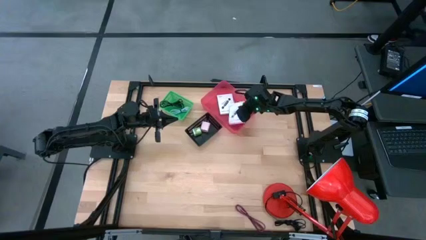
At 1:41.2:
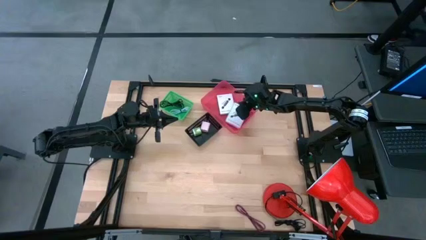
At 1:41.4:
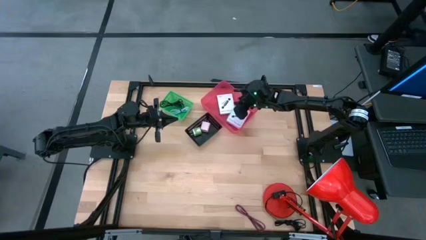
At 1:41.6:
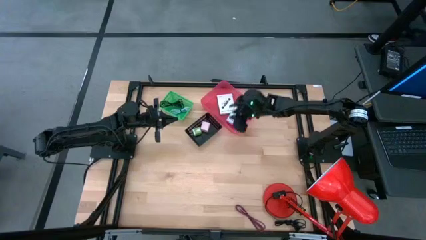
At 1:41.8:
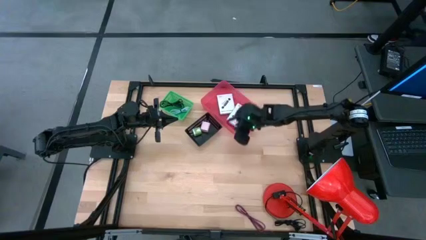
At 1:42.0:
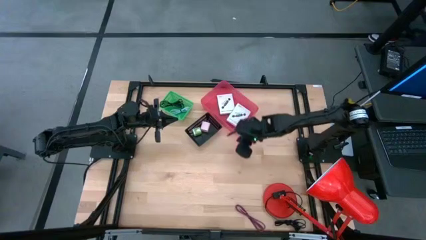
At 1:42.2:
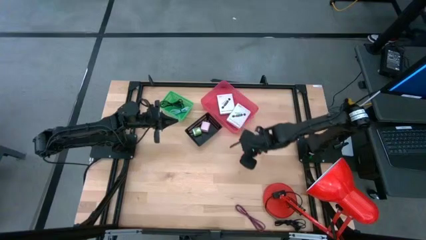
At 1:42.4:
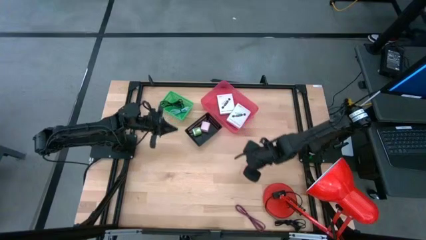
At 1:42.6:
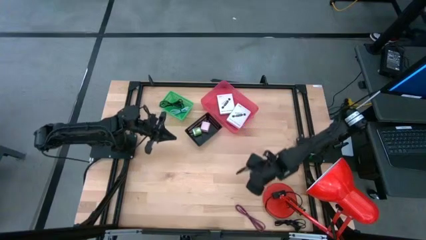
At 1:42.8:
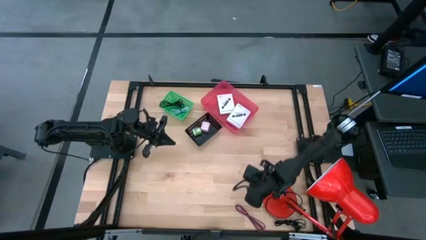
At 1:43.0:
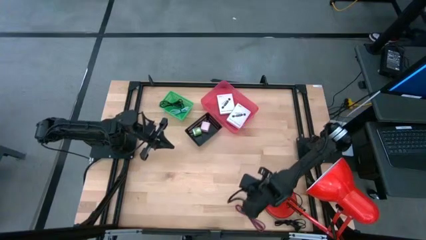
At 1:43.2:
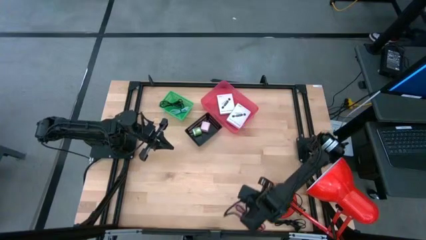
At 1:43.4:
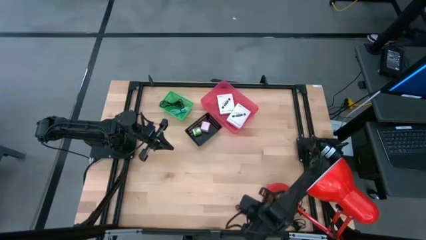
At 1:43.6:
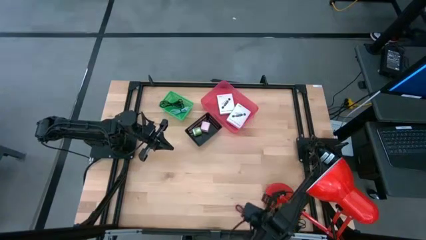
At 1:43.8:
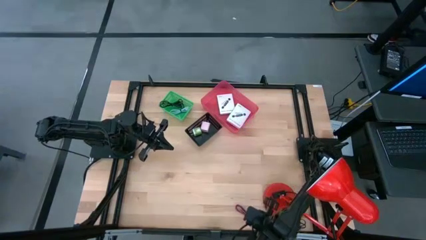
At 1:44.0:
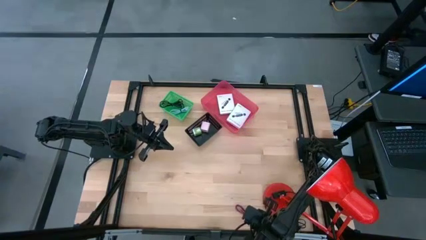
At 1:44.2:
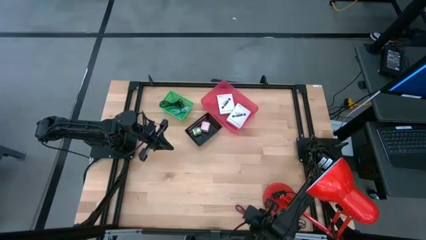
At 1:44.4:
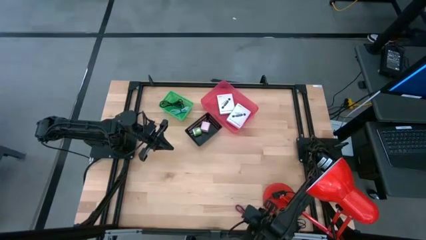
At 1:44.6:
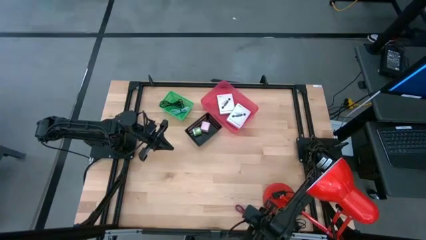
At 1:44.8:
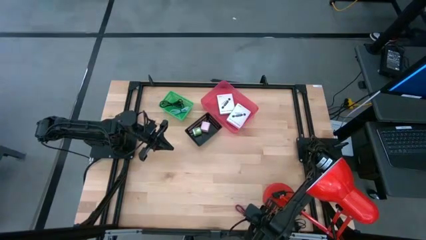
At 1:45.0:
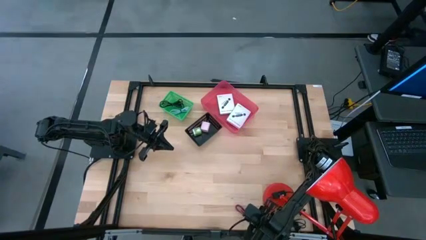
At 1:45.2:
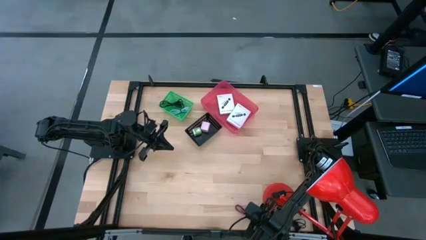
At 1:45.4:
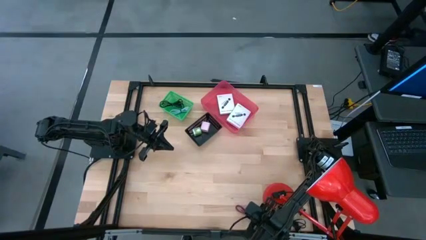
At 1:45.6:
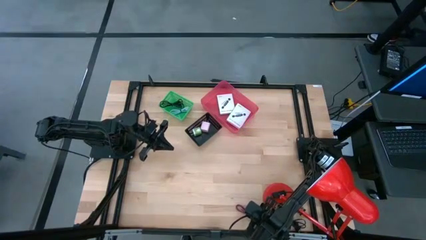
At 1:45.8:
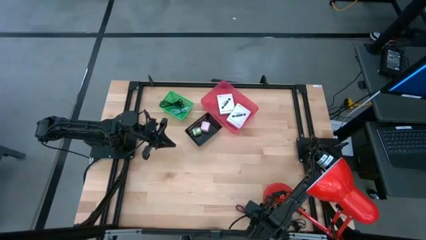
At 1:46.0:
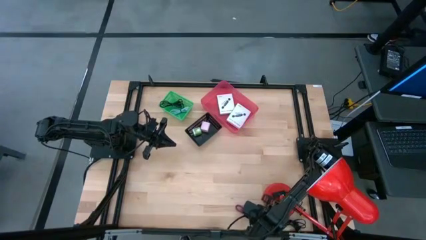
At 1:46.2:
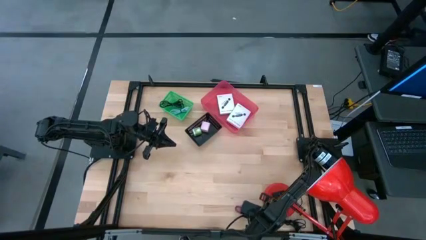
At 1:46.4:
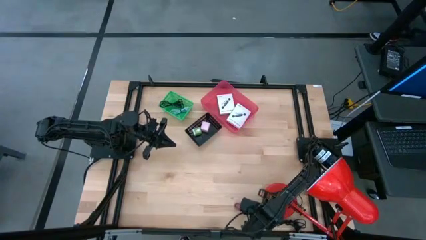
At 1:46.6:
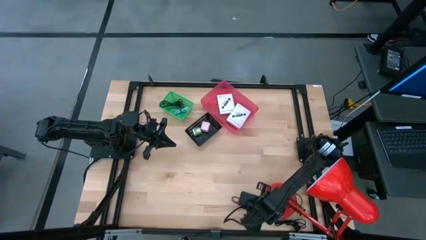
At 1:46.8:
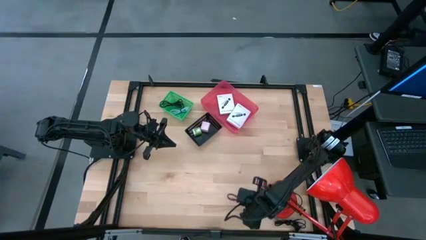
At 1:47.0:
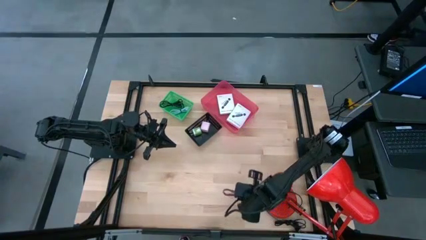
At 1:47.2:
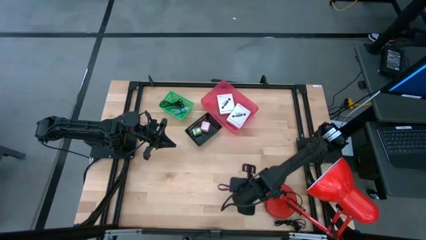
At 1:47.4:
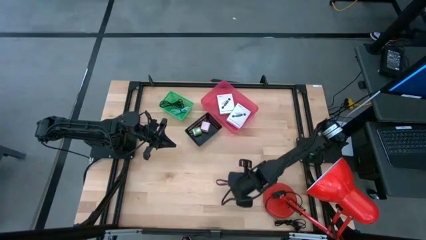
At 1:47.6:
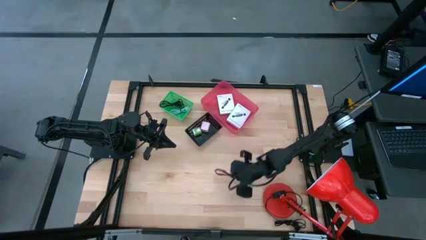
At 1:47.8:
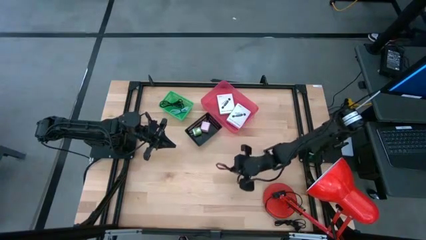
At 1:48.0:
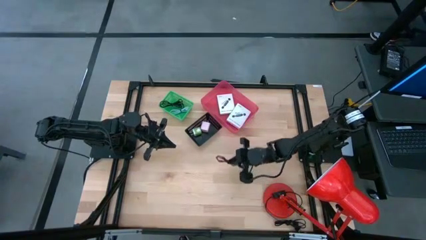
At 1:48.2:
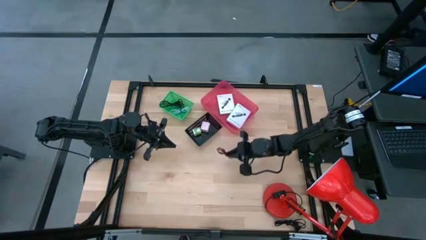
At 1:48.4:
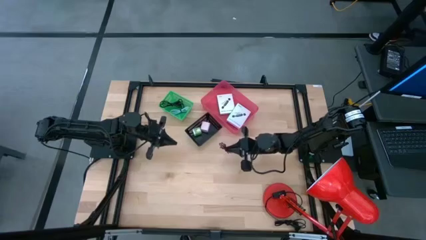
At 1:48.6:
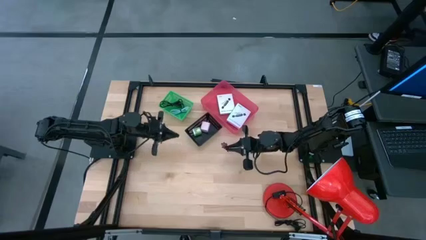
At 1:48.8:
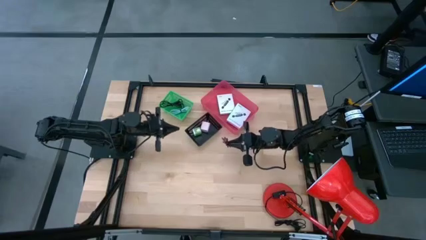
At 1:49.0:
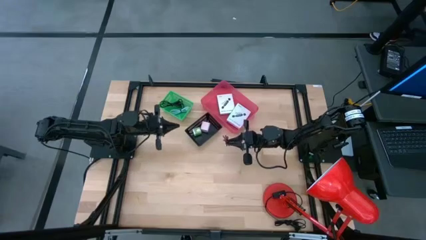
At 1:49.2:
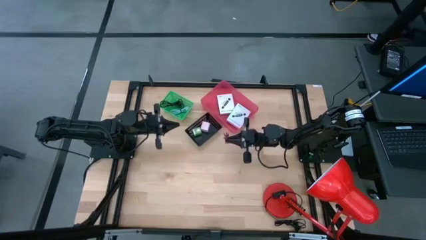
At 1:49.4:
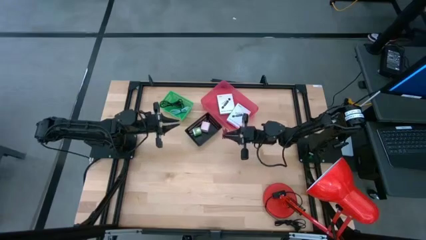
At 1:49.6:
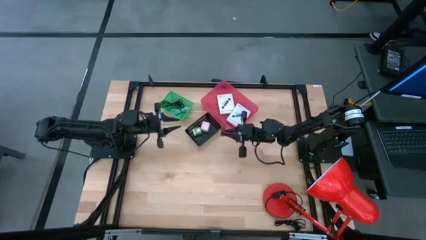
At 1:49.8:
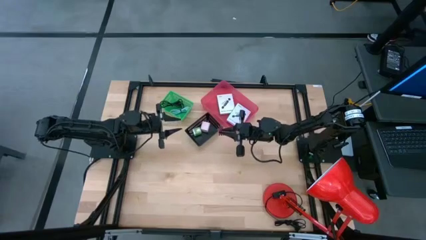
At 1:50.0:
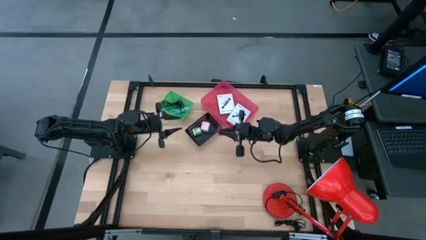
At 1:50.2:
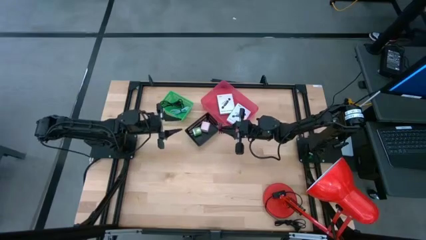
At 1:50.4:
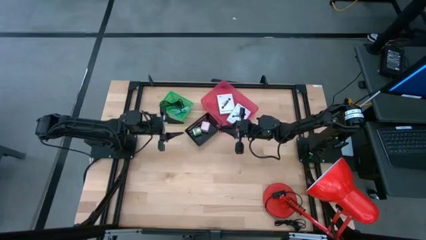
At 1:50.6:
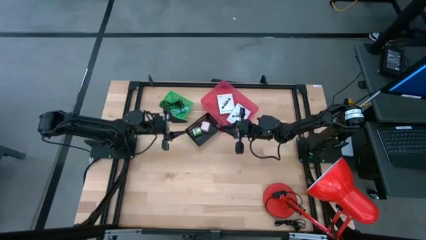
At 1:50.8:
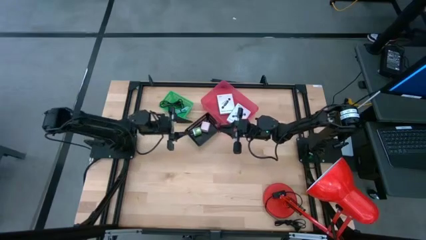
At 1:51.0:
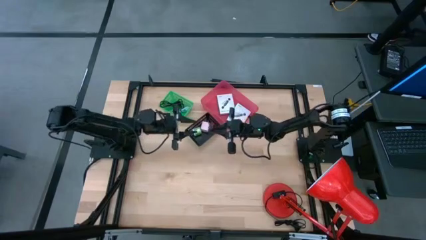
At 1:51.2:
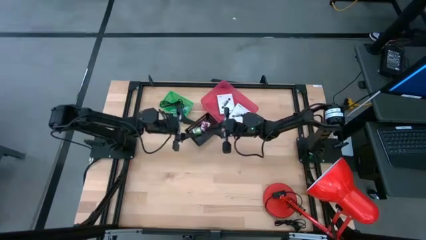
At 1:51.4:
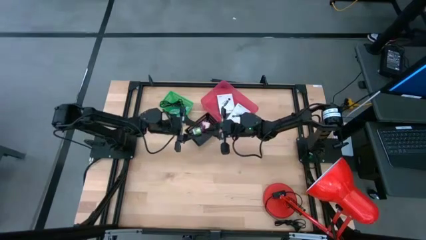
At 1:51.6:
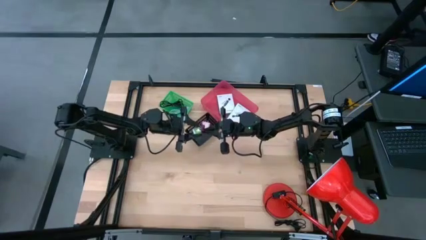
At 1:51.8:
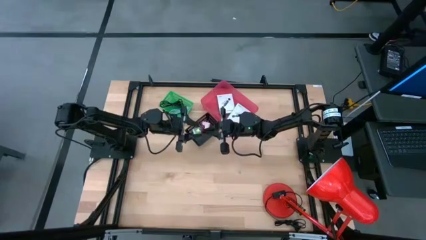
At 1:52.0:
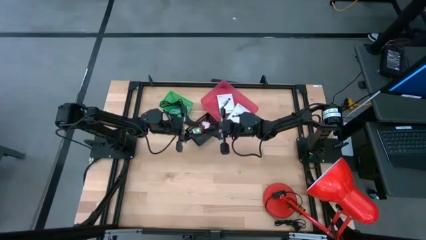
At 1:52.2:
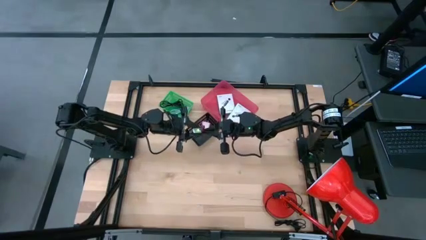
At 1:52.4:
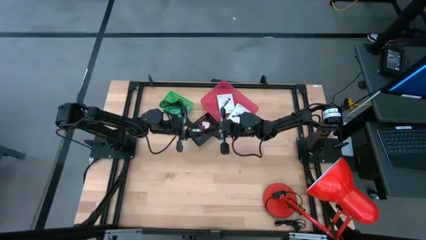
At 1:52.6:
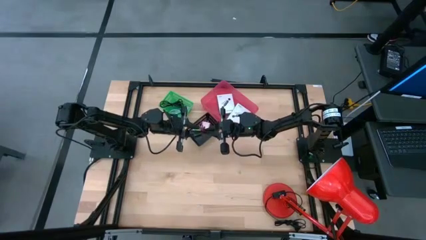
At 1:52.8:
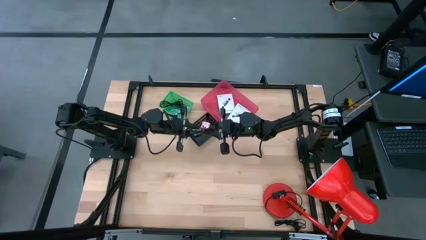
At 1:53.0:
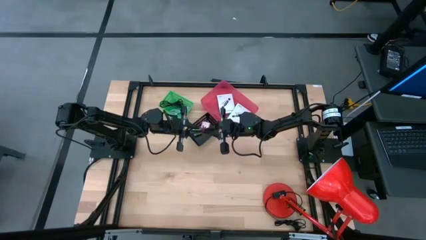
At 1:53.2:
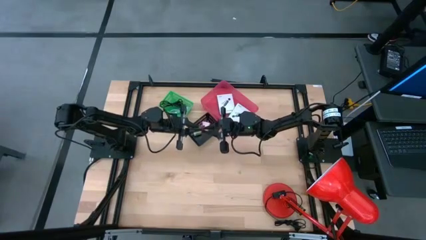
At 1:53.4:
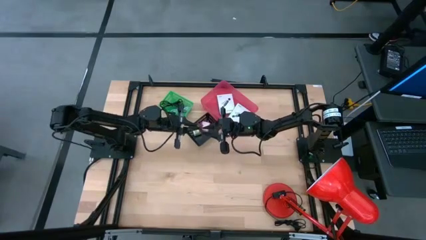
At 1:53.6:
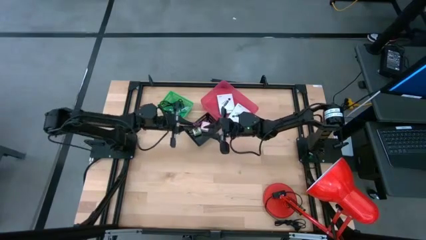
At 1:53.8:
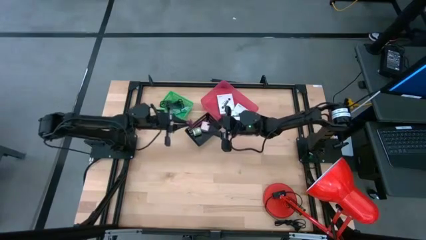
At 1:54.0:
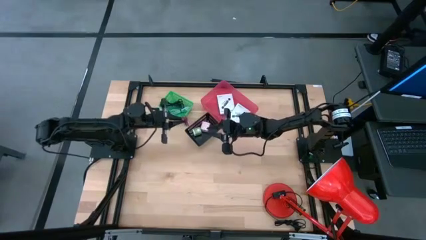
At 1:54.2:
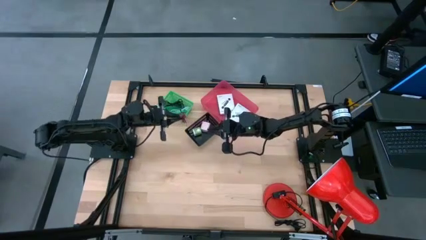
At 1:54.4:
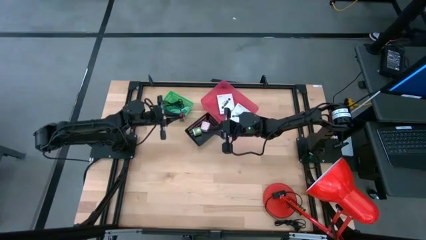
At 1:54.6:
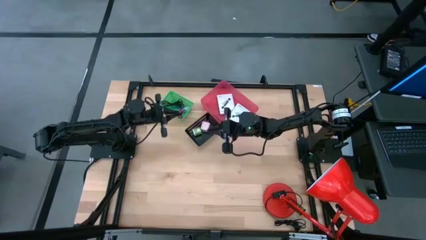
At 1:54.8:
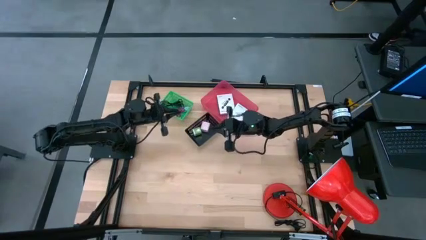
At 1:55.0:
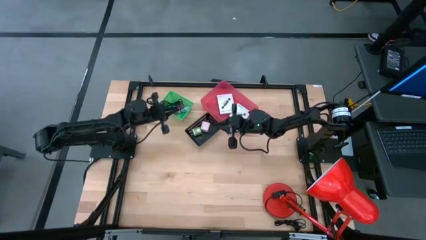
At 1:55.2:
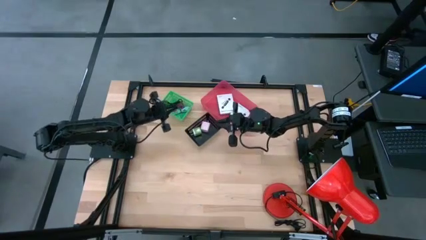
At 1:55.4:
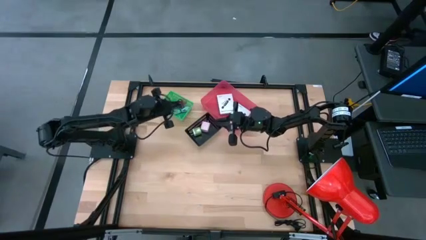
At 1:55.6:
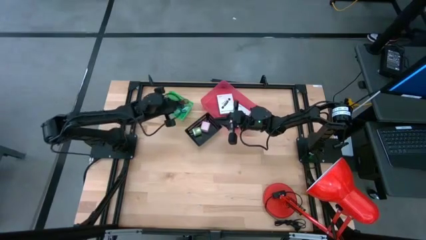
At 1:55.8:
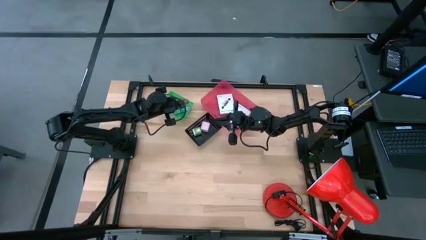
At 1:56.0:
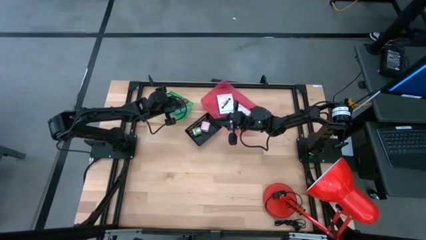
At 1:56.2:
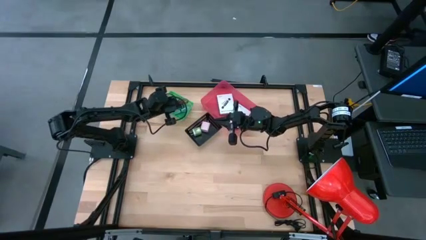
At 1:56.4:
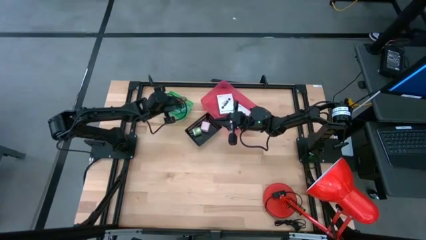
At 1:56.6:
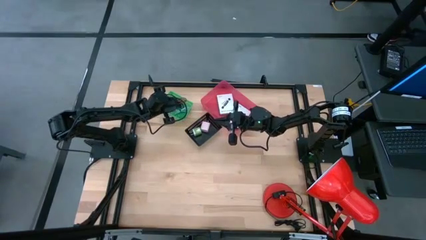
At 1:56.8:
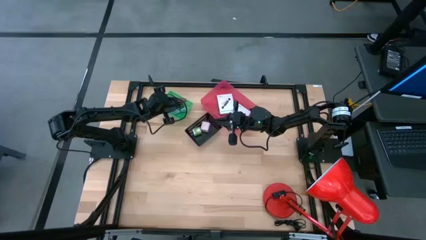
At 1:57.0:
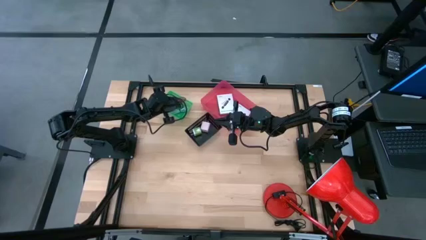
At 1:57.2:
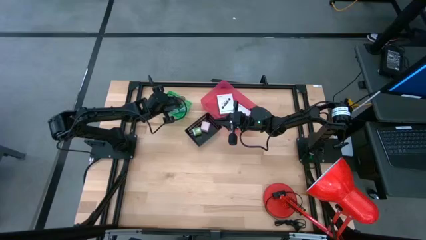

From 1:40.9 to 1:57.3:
Task: Pick and place items into bin
Put the pink charger cable into the green bin
